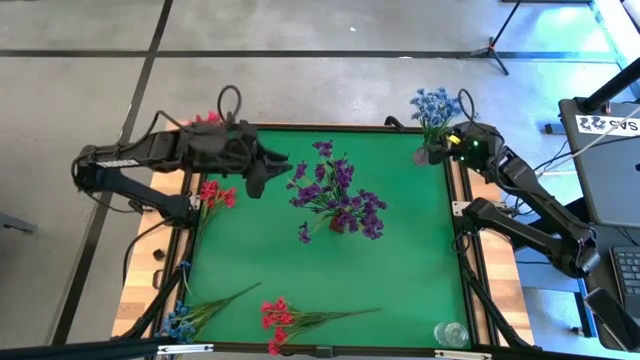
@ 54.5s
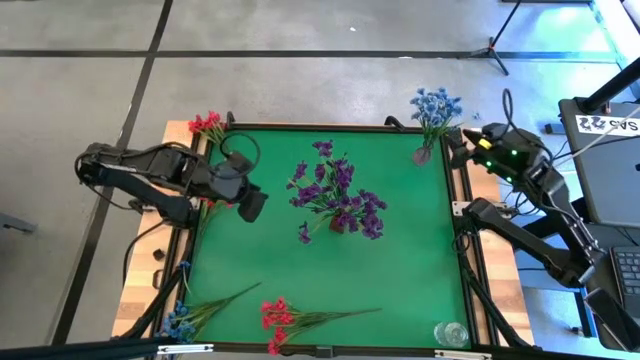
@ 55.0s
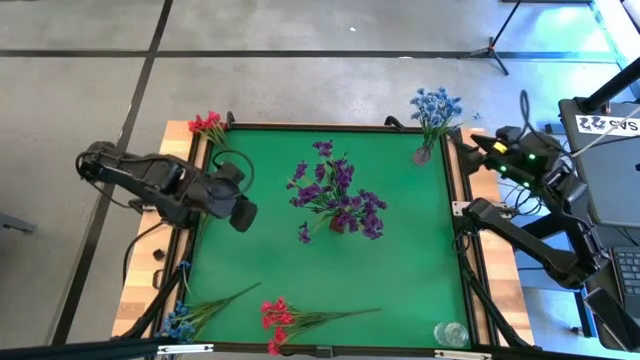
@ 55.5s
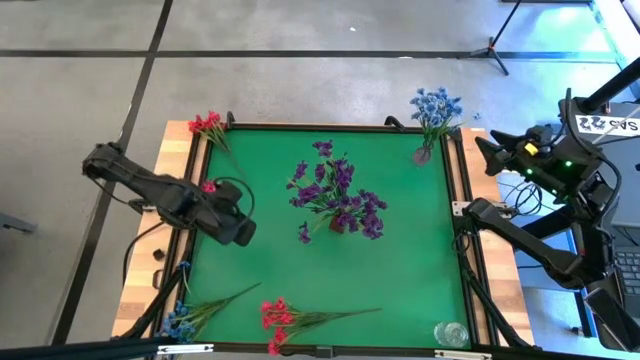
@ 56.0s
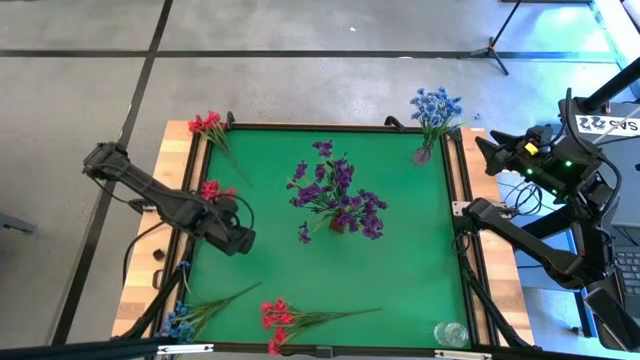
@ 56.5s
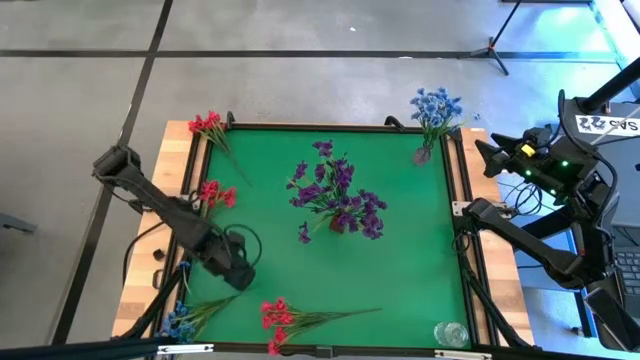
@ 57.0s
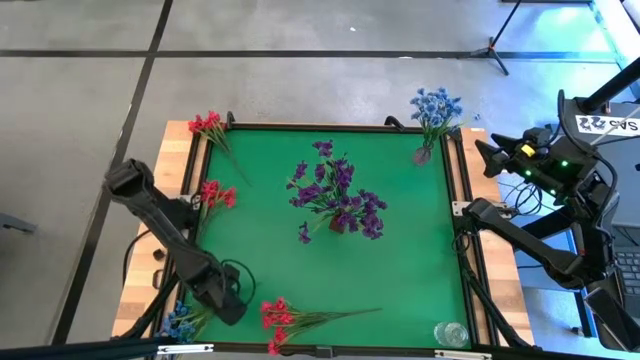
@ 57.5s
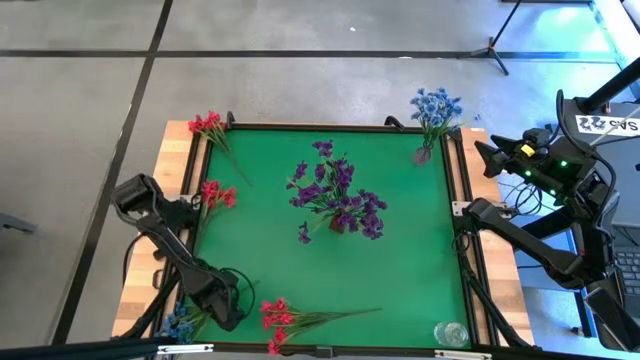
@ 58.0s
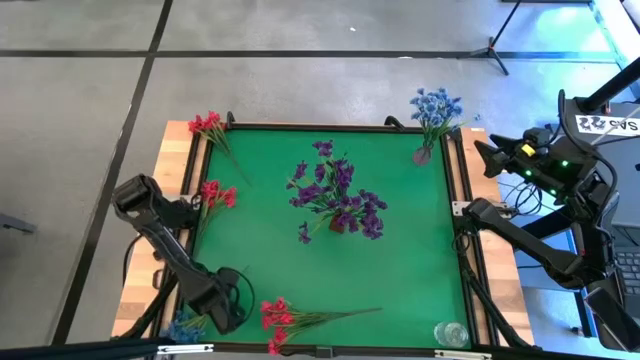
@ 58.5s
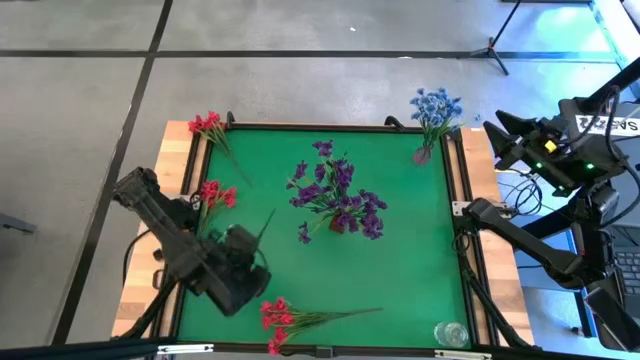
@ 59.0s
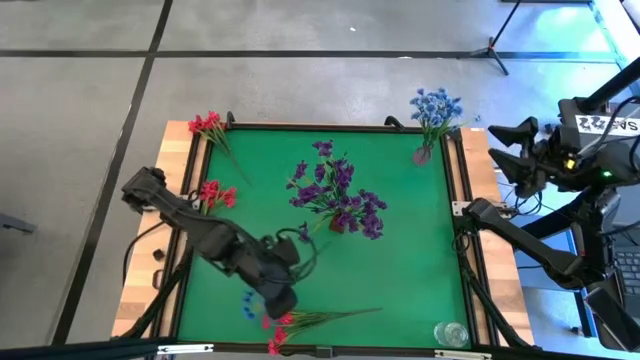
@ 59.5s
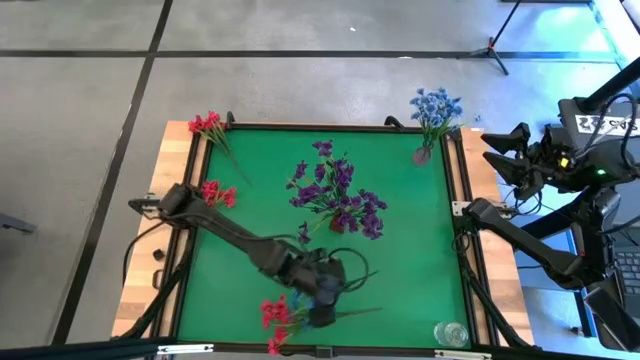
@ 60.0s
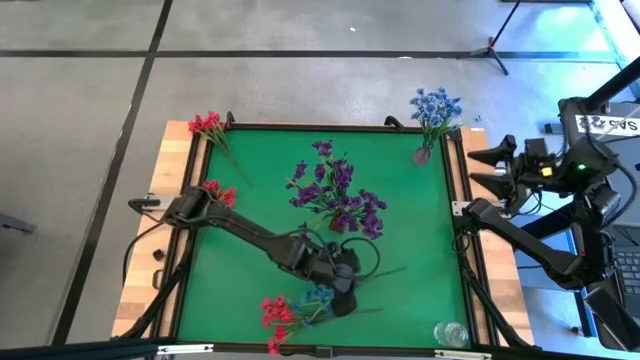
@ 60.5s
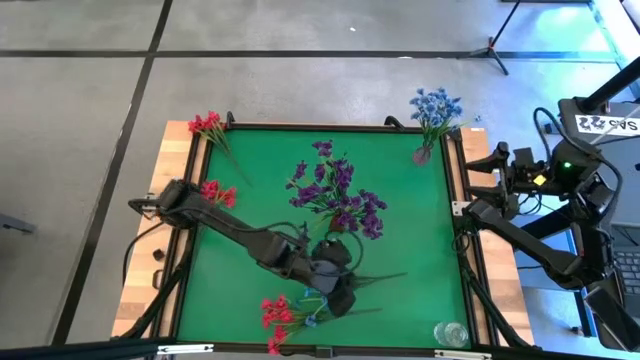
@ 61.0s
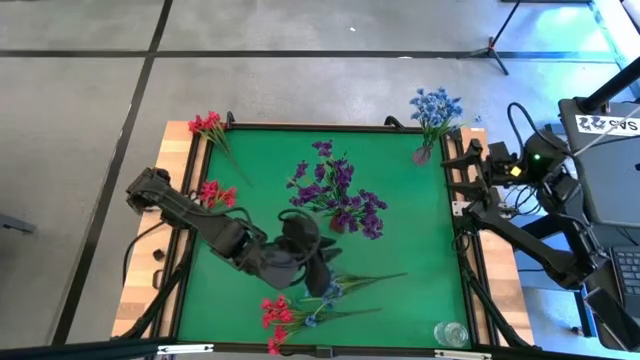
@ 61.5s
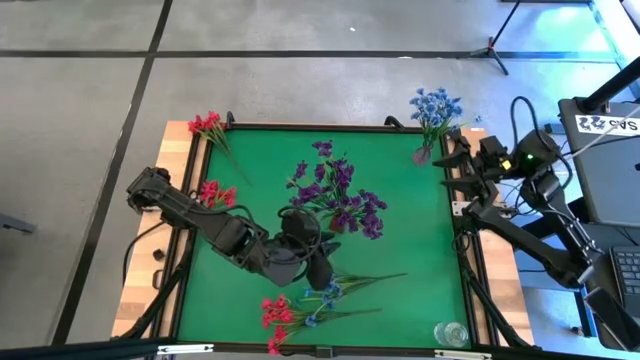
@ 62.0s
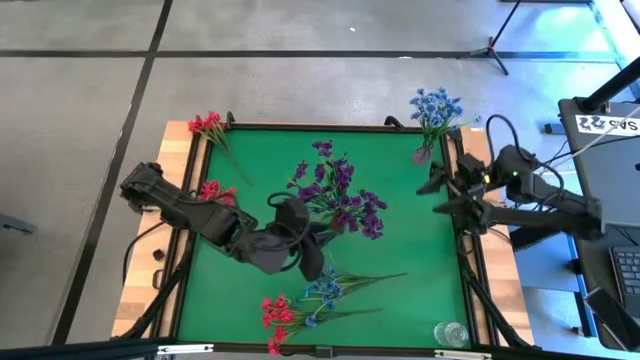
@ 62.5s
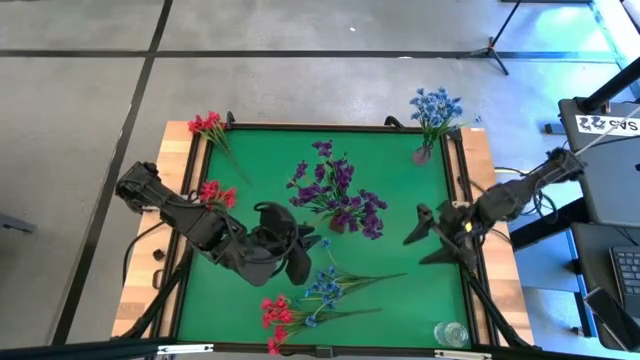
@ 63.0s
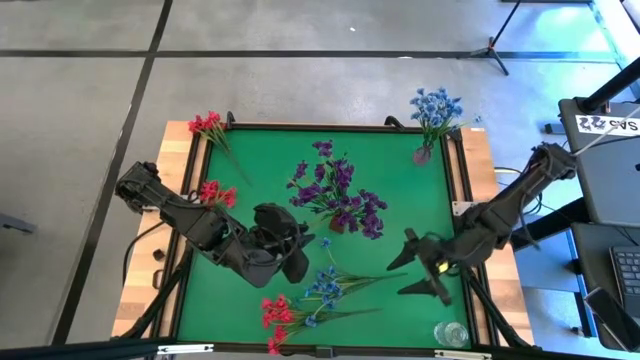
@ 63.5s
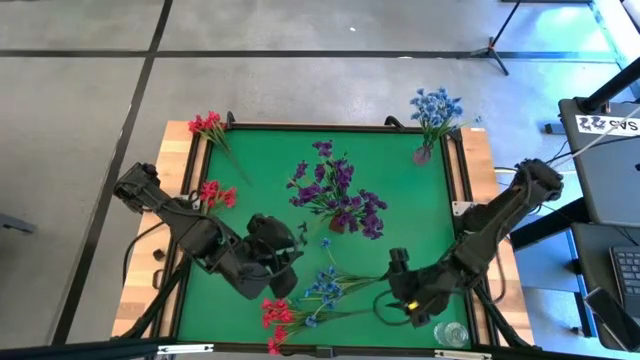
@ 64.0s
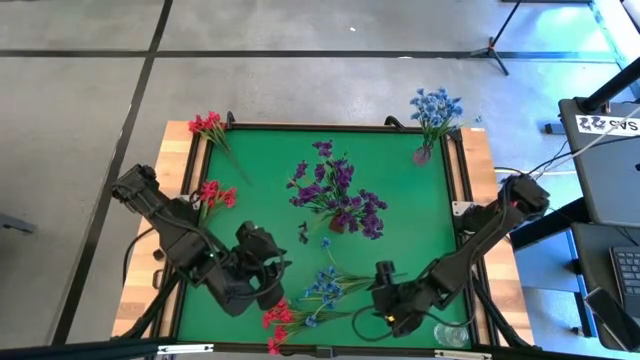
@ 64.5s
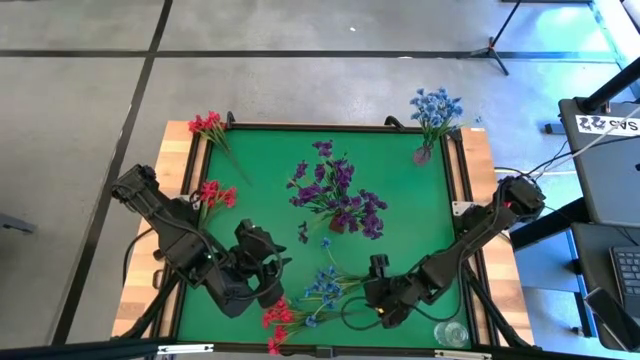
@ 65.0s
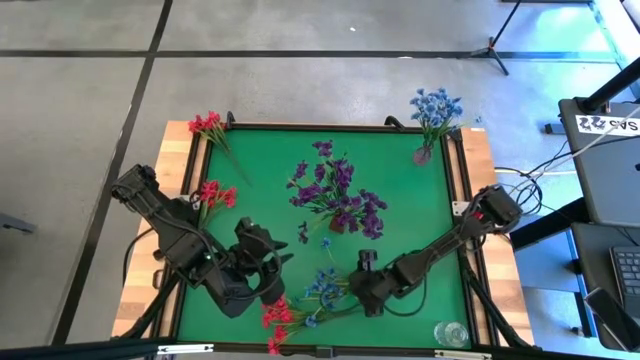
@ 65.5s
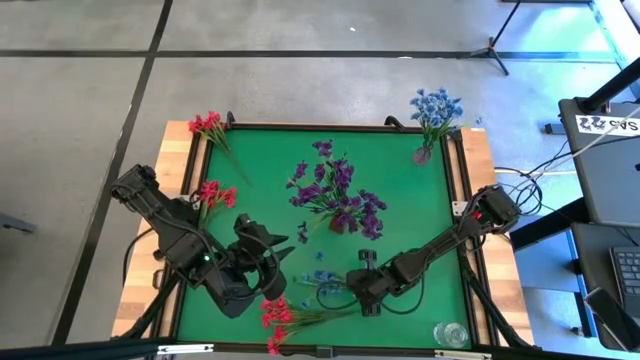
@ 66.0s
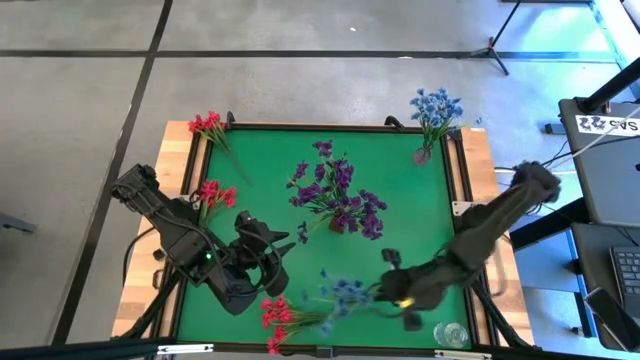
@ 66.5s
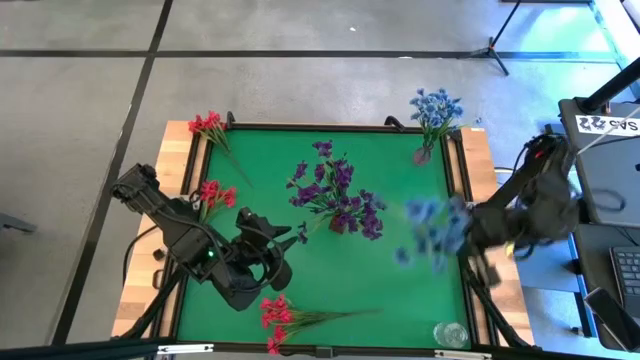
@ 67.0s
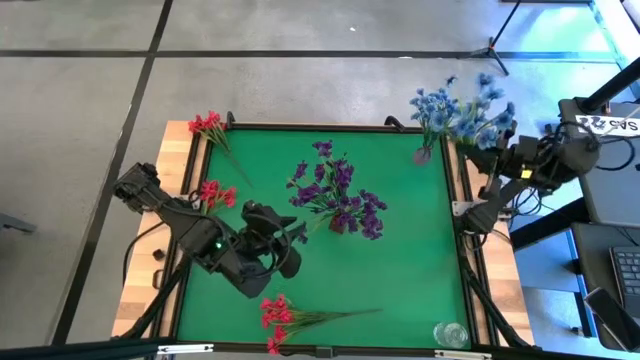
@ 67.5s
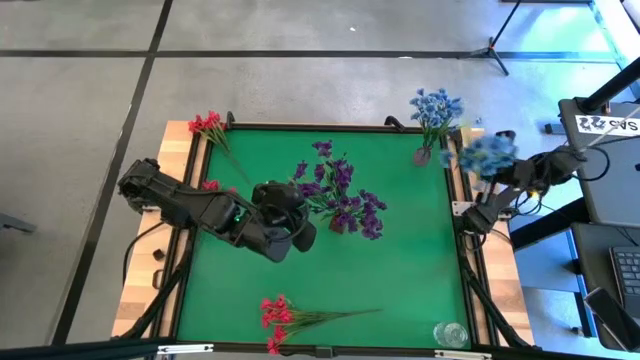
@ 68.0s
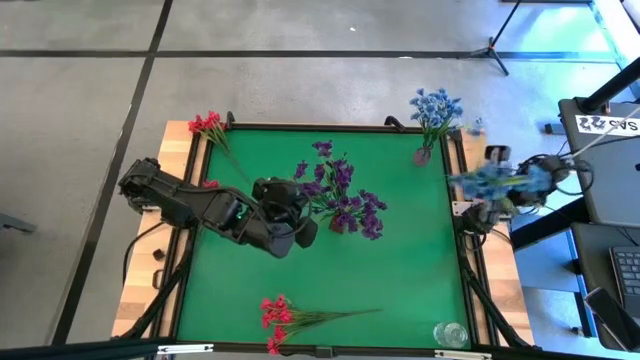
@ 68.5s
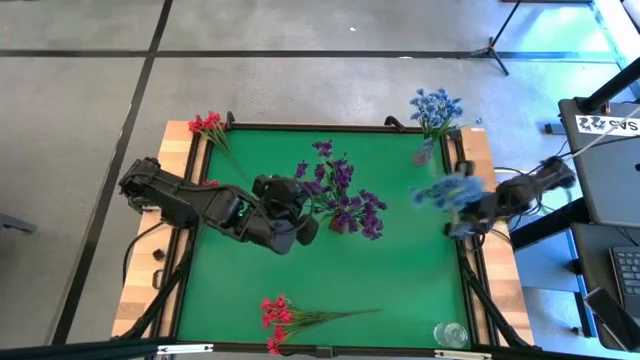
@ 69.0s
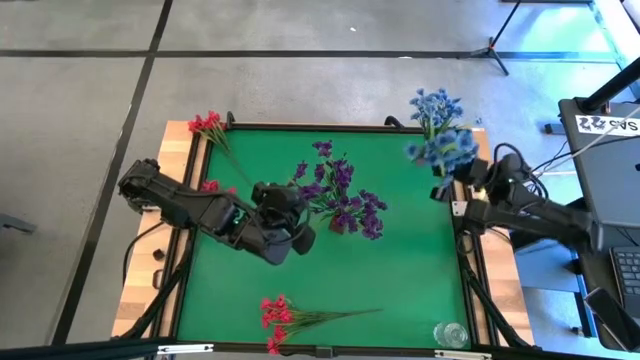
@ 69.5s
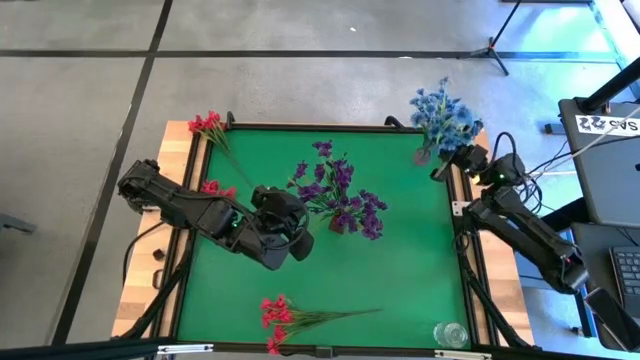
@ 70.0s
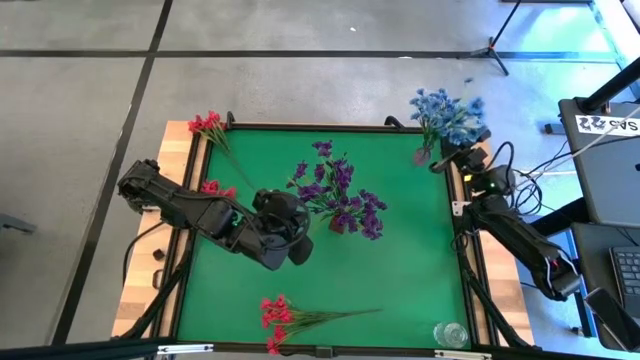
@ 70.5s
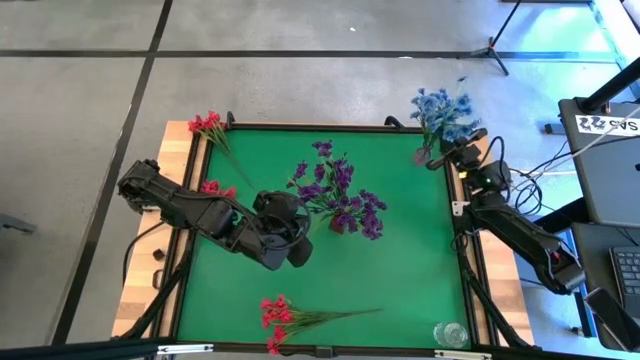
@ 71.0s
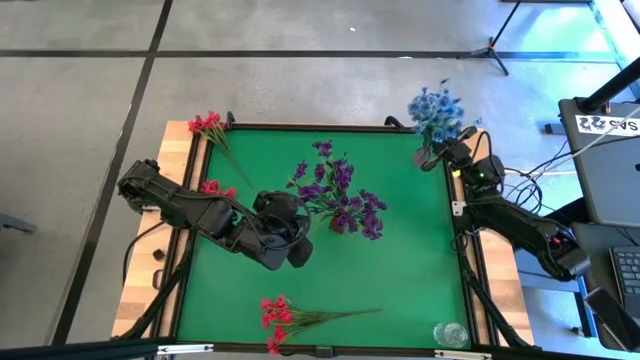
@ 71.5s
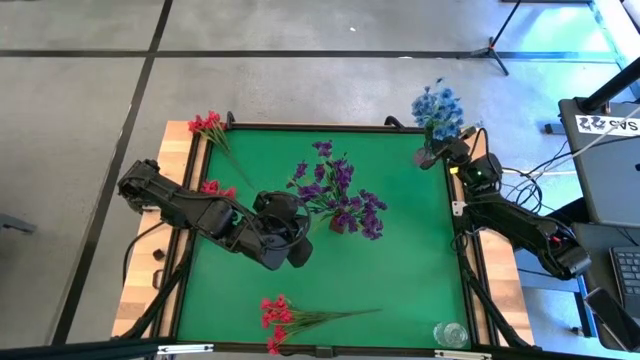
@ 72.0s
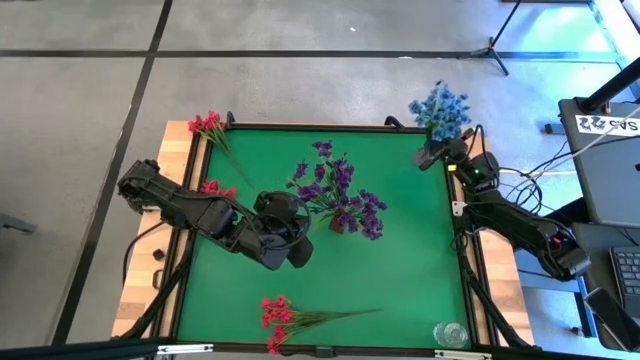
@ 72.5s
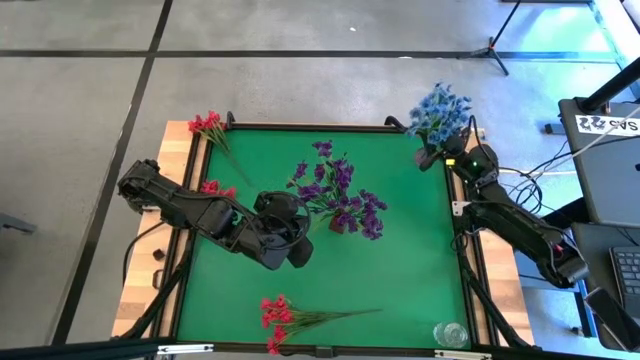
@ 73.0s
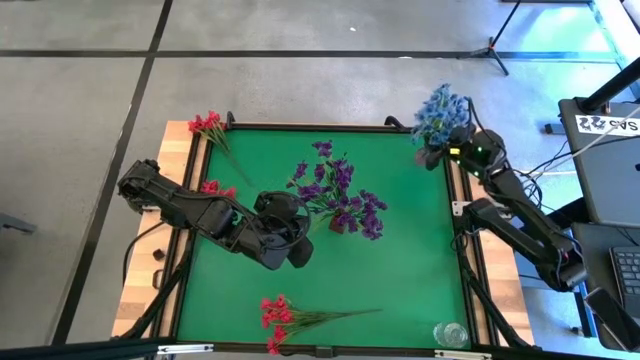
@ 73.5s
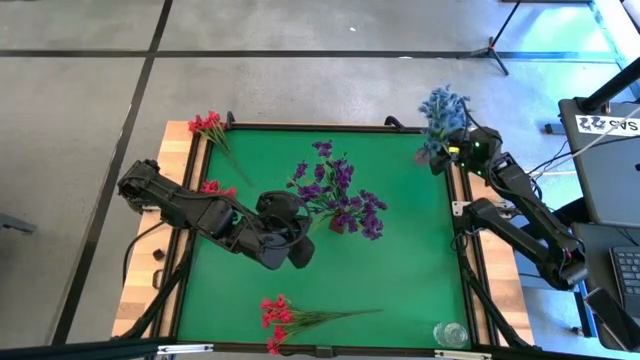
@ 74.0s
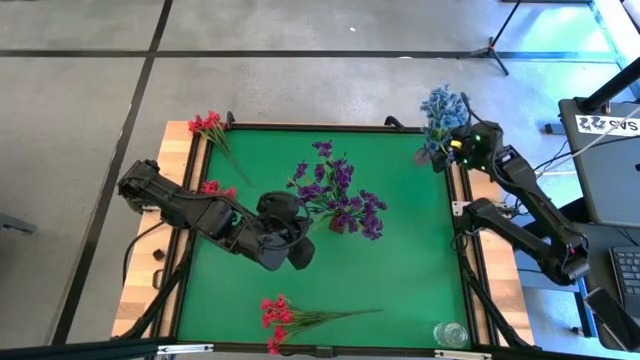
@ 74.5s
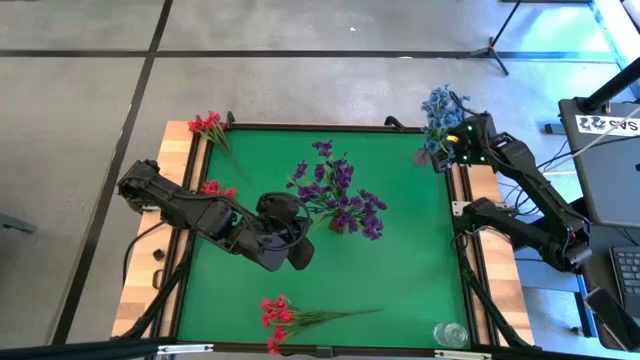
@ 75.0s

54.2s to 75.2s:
Task: Sort flowers into vase by color
Put the blue flowers into the violet vase

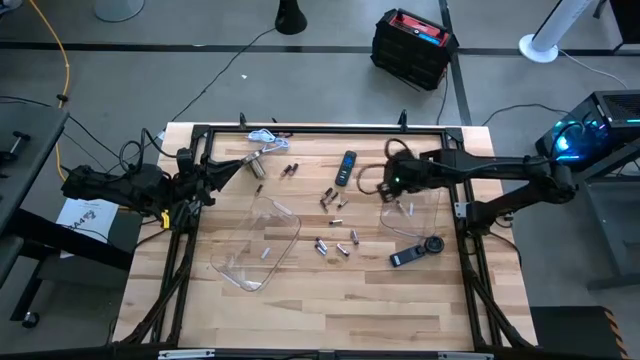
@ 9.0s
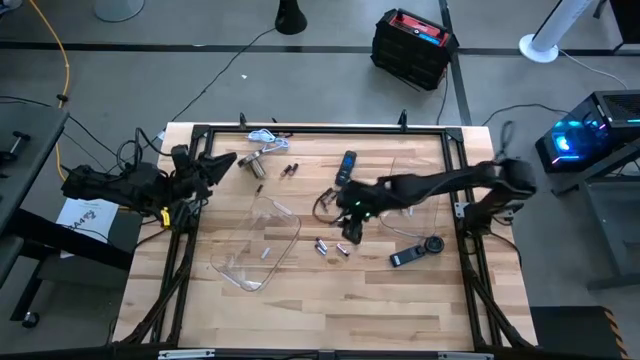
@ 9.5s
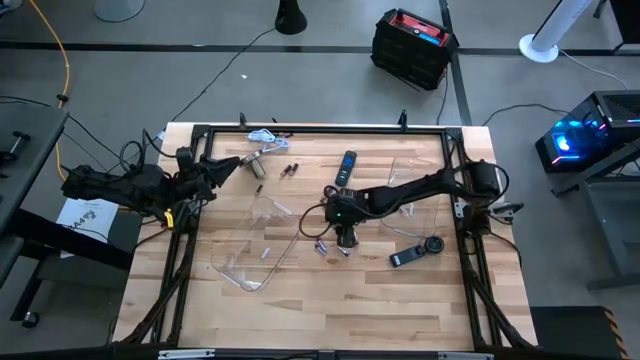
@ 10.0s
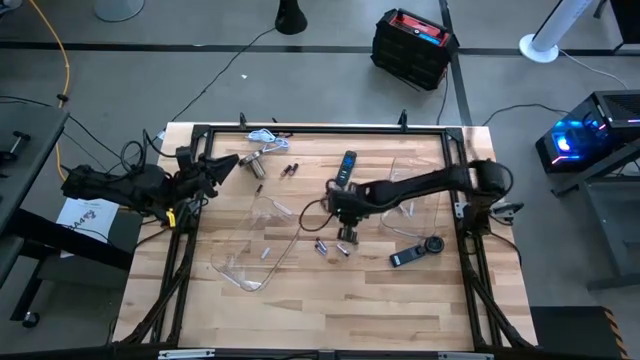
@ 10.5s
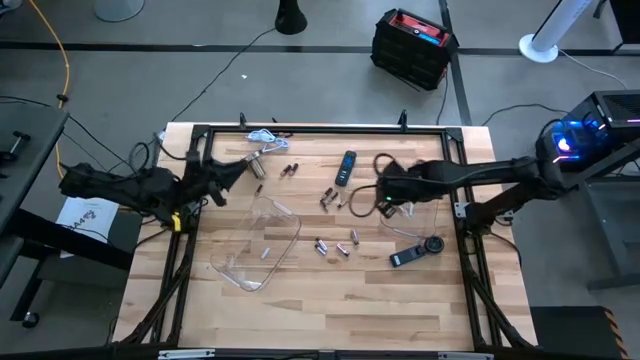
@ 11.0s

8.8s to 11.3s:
Task: Sort batteries
Put the white battery into the right transparent bin
